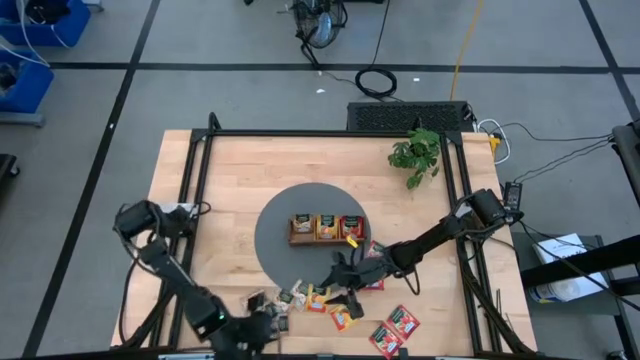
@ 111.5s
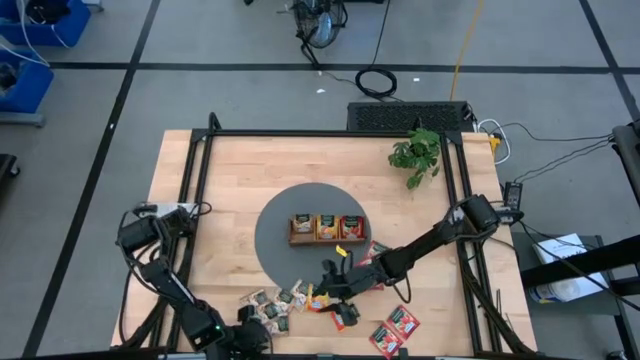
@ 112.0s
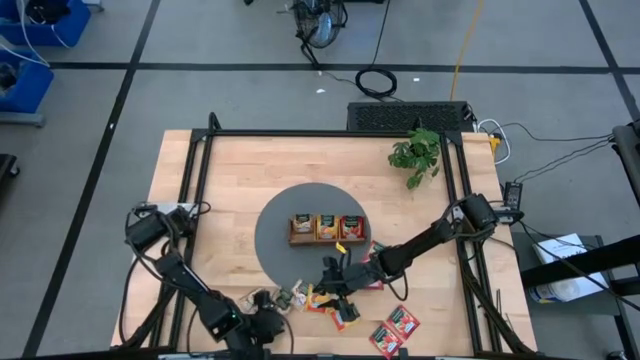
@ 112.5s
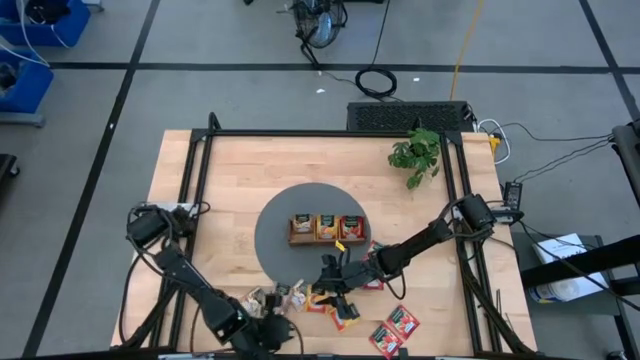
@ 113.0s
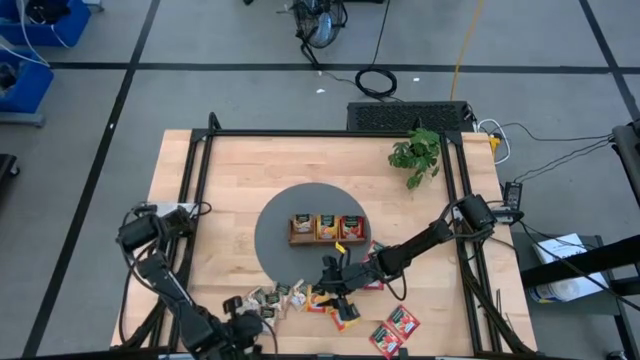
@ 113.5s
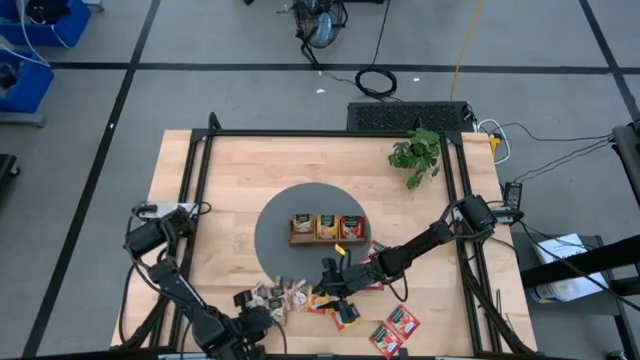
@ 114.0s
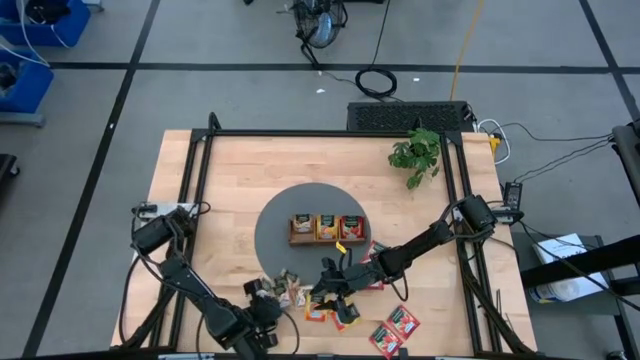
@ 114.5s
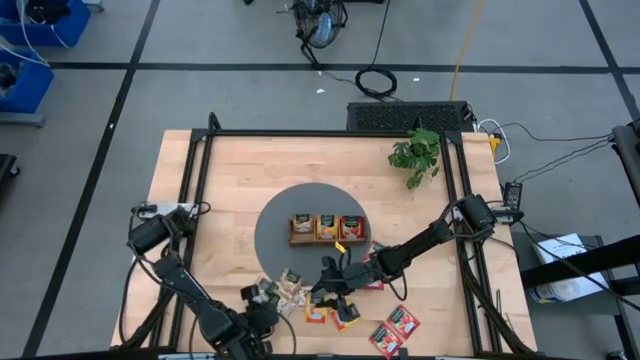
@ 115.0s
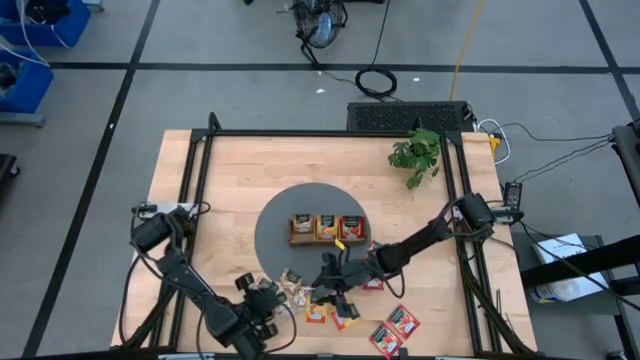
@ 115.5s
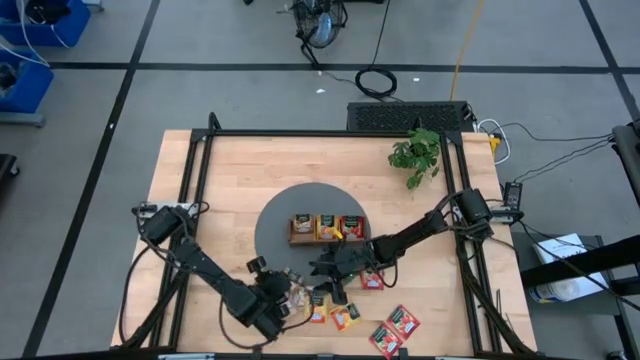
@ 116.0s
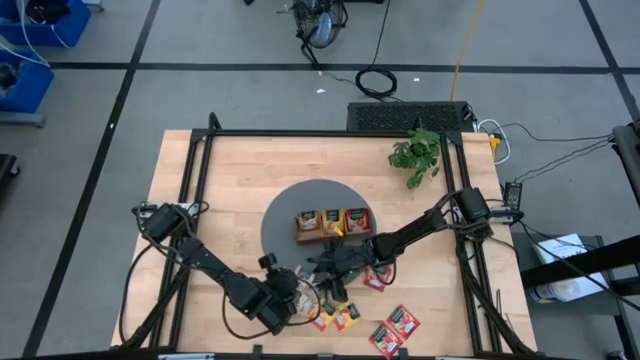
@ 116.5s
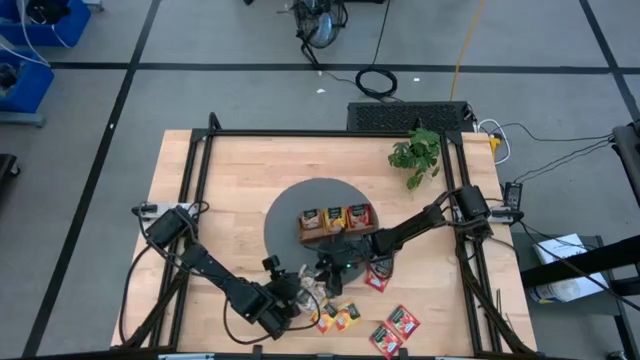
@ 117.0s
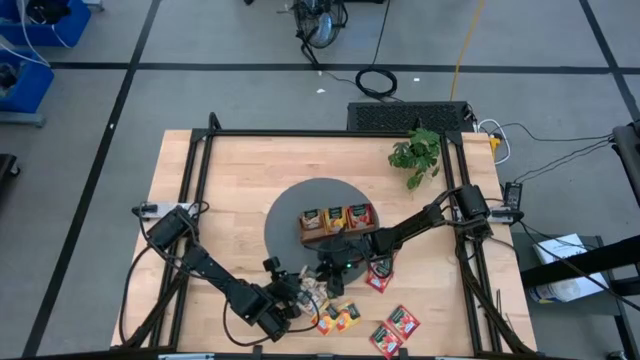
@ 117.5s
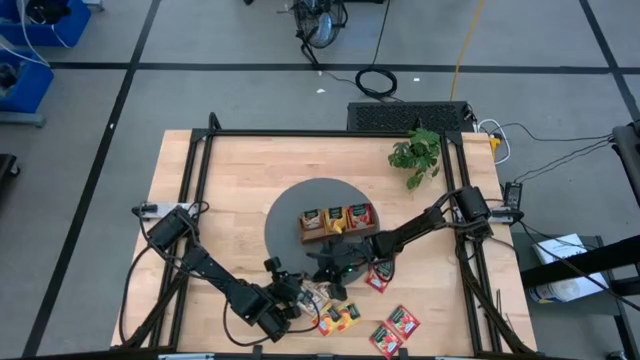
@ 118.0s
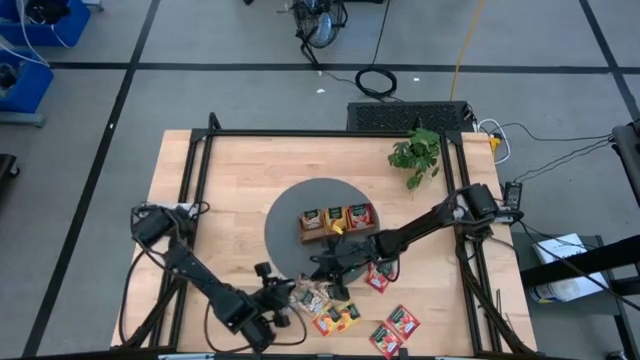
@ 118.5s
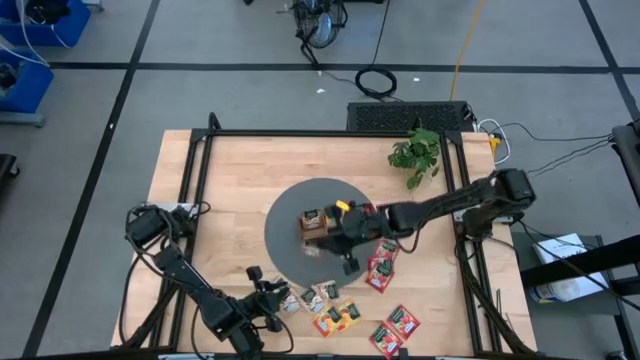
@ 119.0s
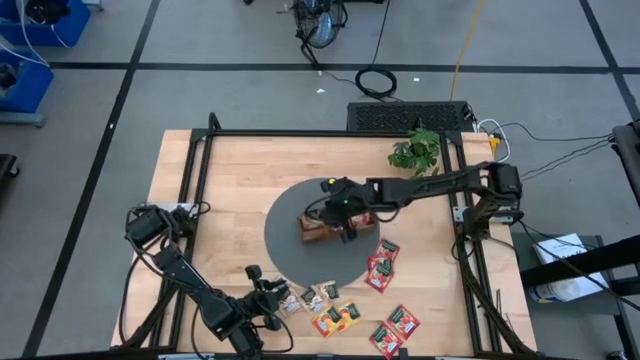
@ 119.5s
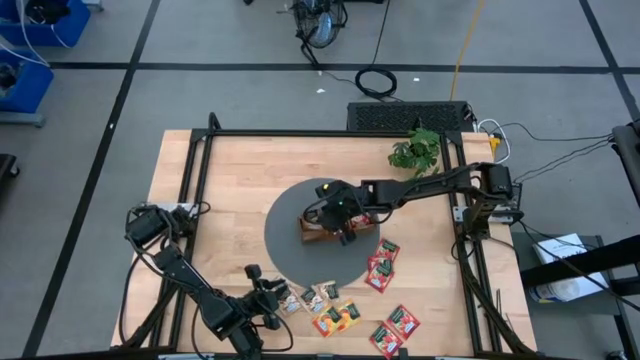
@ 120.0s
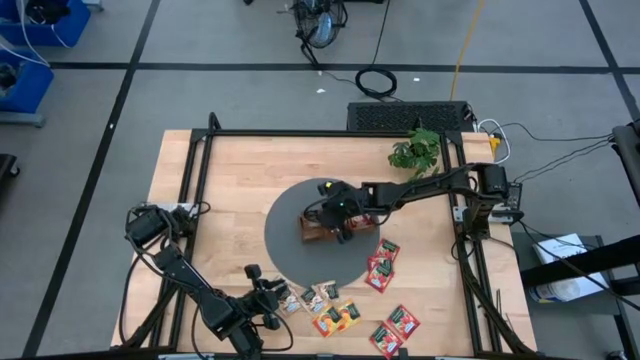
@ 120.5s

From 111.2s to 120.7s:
Task: Pick & Place Tea
Put the light brown tea sachet into the left section of the wooden organizer

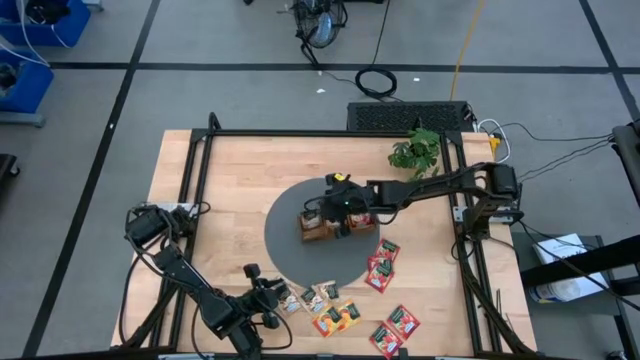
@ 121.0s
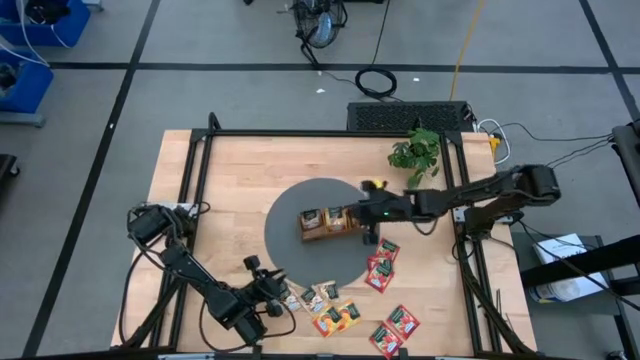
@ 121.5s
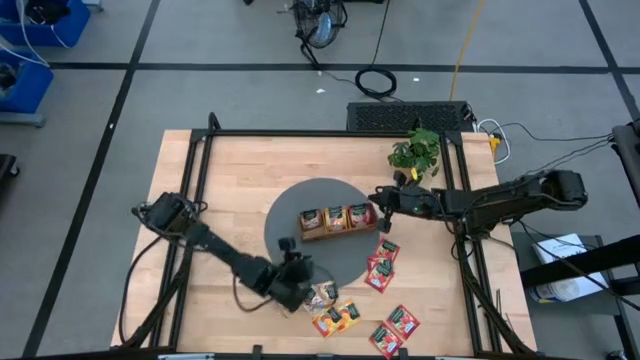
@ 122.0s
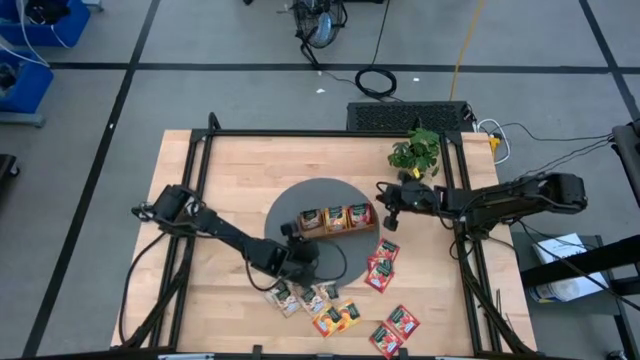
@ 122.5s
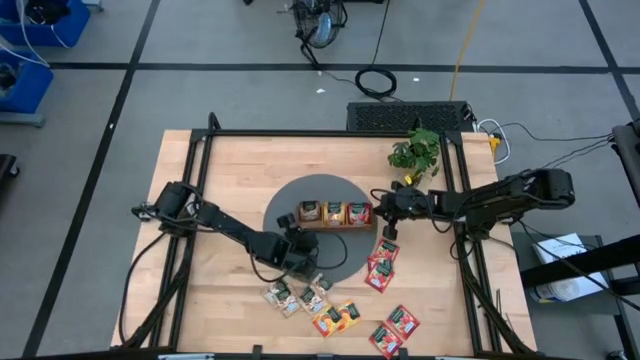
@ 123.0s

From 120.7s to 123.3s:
Adjust the wooden organizer

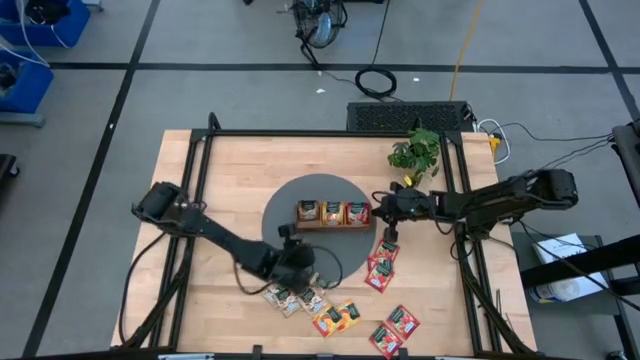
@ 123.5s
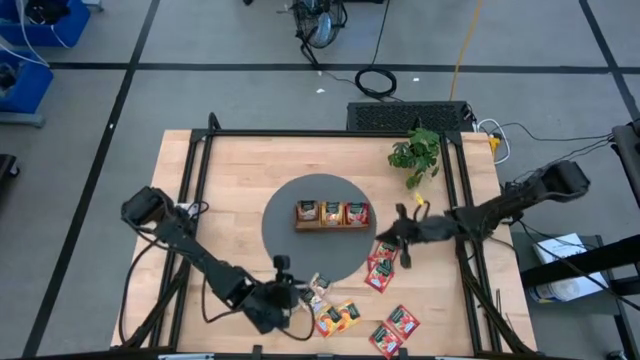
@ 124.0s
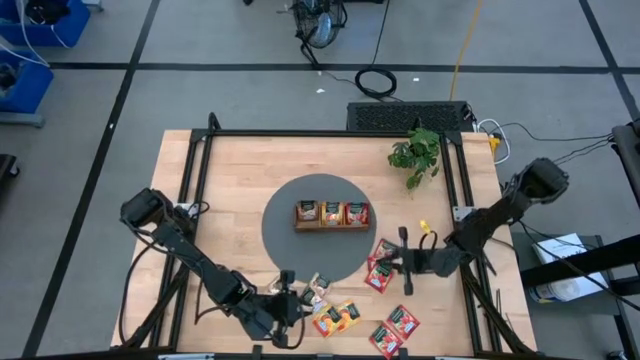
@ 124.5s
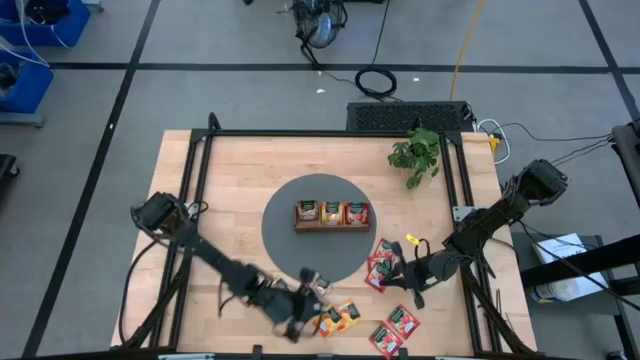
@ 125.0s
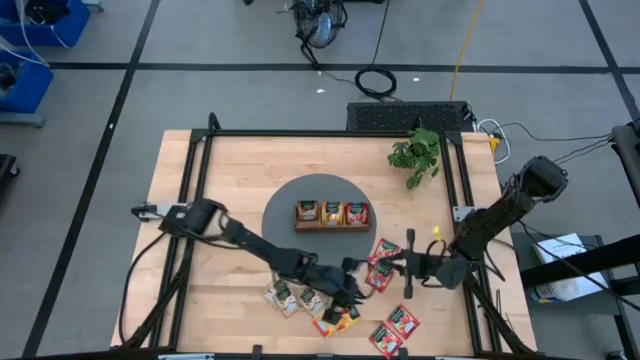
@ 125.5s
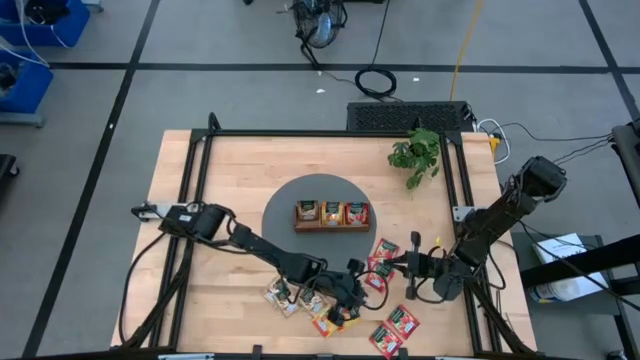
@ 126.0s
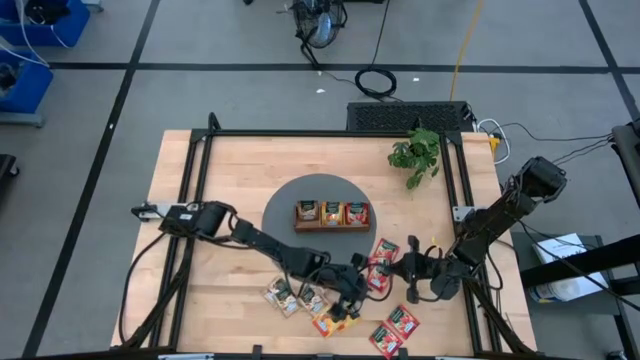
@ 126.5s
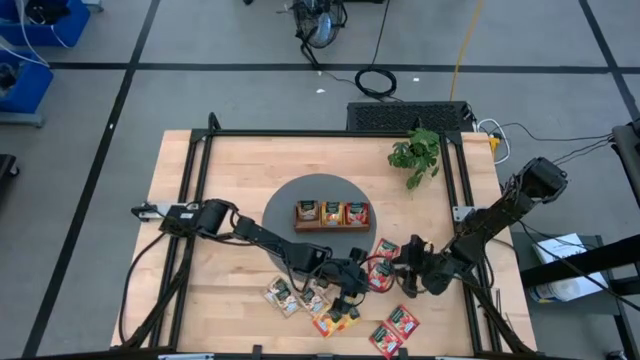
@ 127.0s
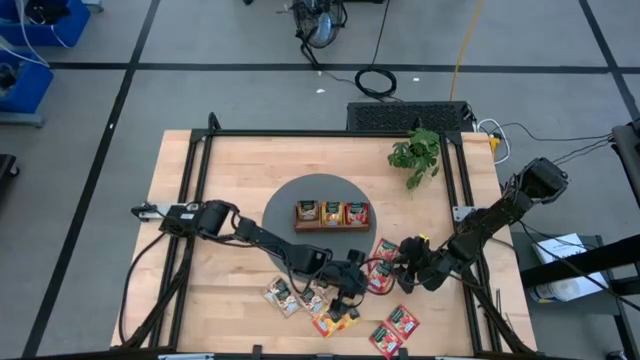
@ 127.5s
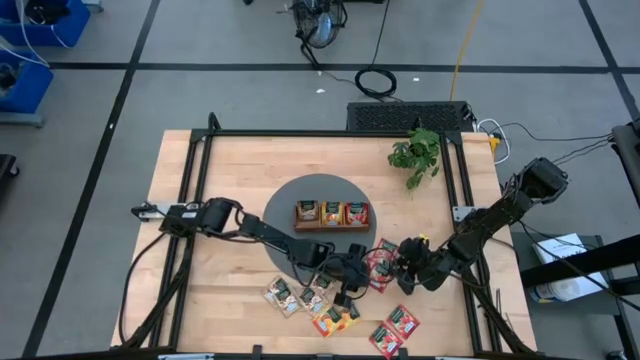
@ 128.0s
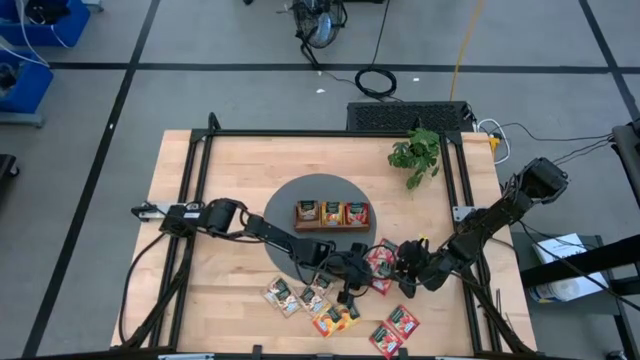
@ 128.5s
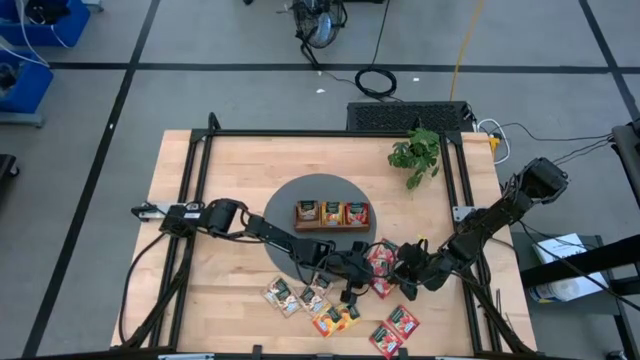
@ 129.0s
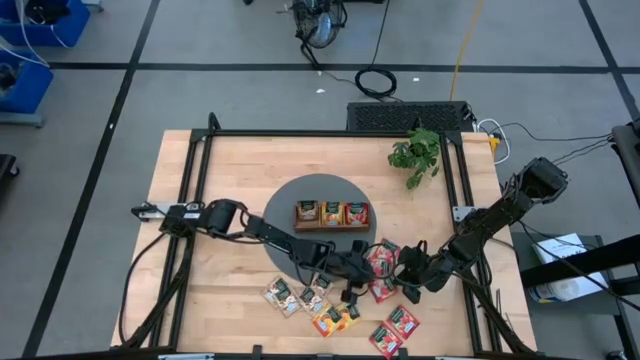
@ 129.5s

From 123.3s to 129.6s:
Put the red tea sachet into the right section of the wooden organizer

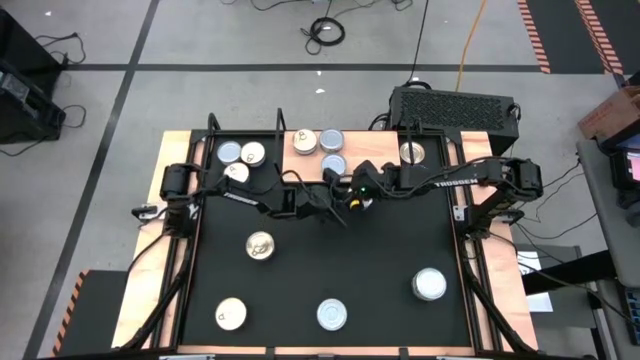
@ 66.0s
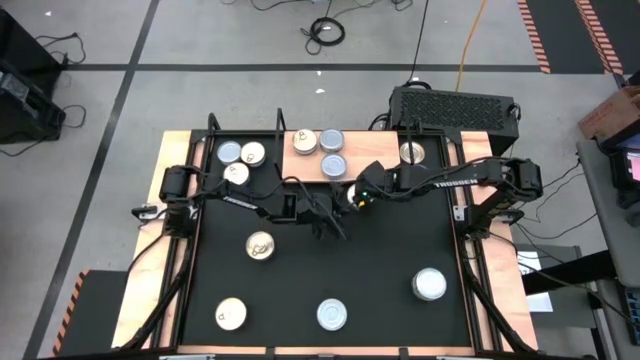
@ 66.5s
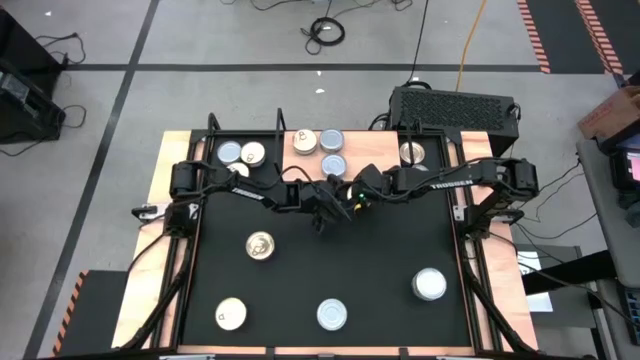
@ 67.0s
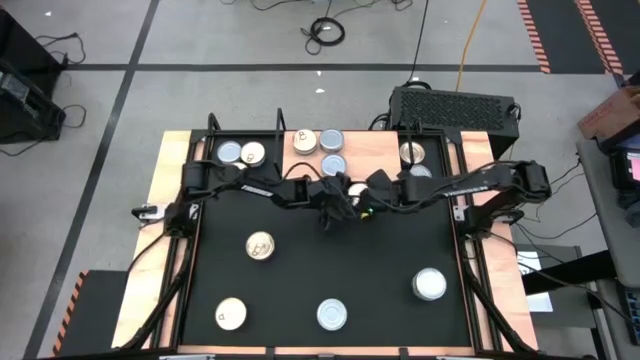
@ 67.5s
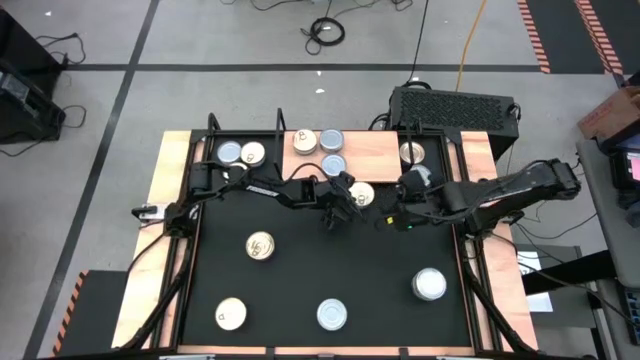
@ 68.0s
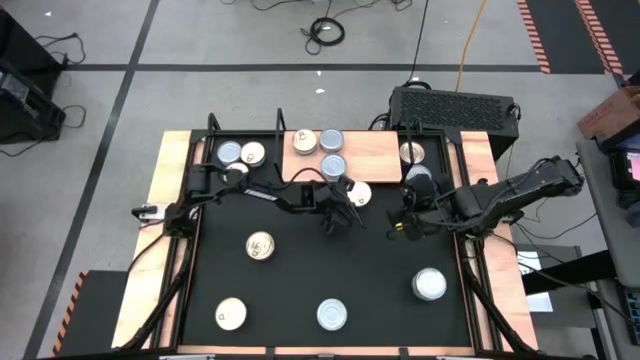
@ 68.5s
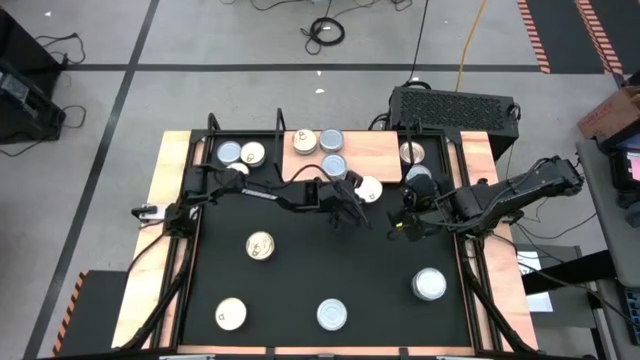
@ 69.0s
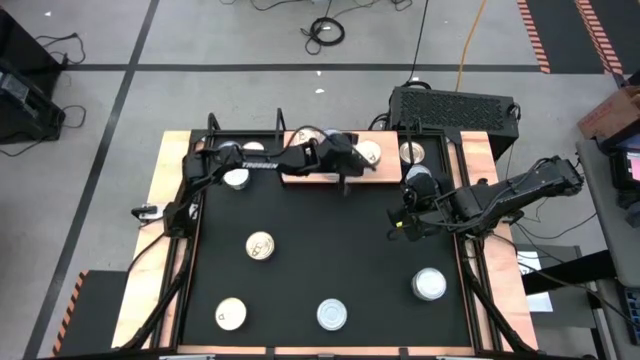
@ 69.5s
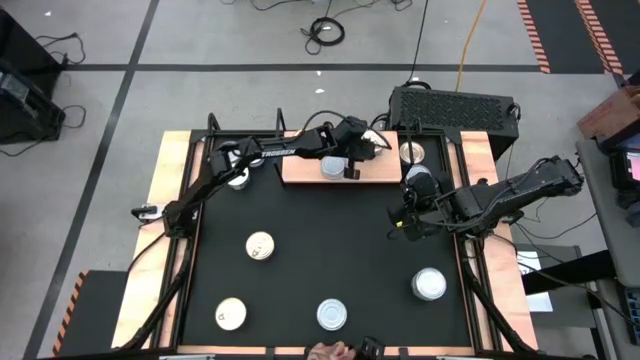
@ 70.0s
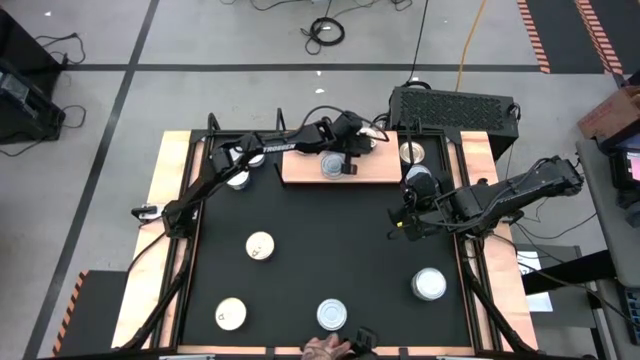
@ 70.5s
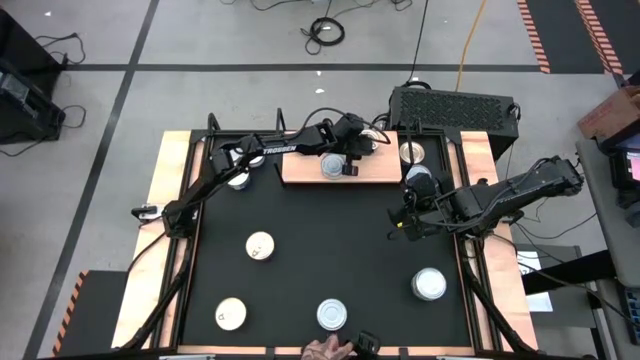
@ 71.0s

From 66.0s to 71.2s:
Task: Stack canned seafood by type on shelf
Put the center blue tuna can on the shelf
